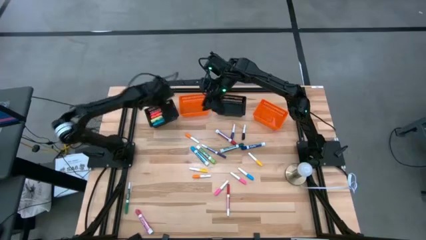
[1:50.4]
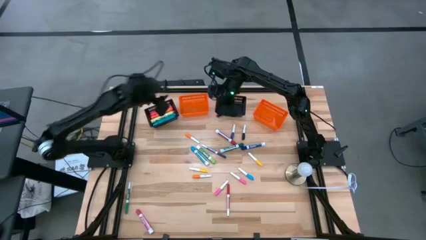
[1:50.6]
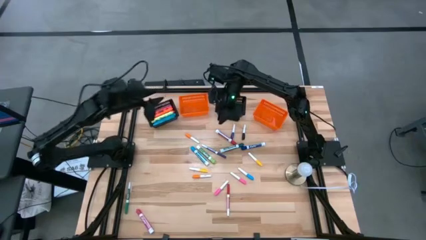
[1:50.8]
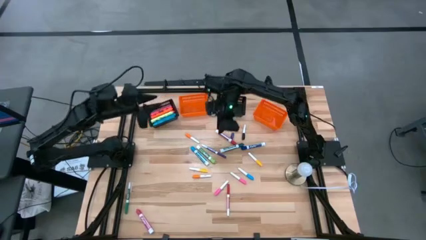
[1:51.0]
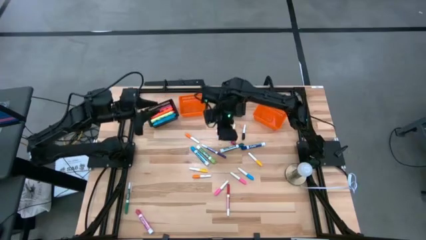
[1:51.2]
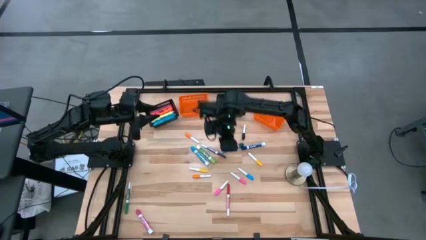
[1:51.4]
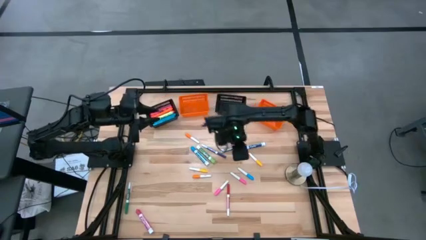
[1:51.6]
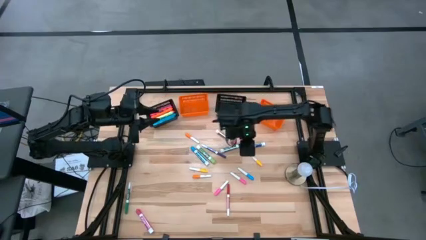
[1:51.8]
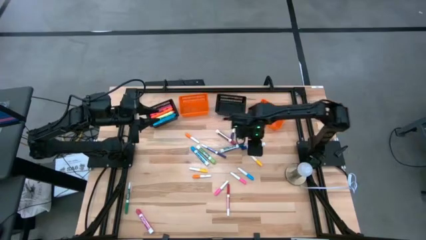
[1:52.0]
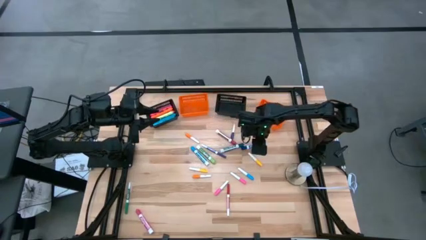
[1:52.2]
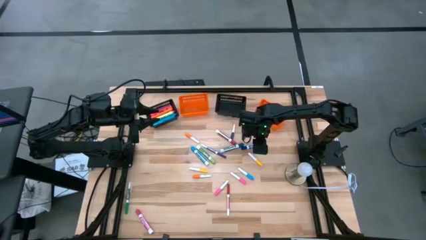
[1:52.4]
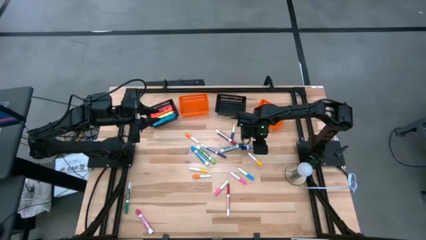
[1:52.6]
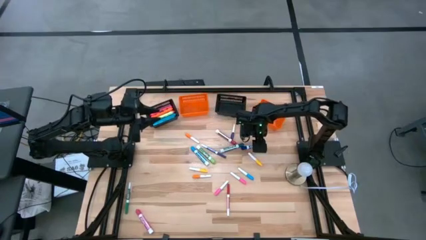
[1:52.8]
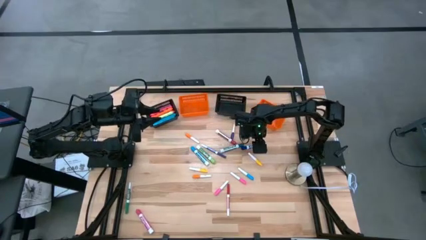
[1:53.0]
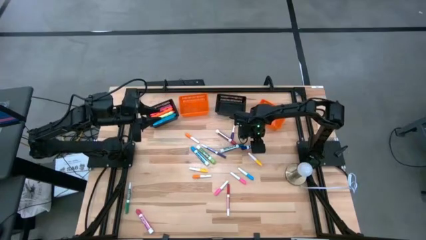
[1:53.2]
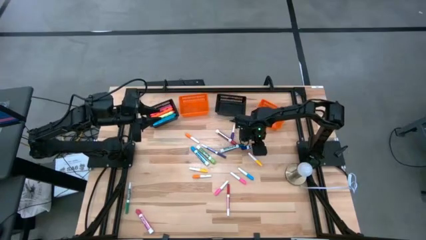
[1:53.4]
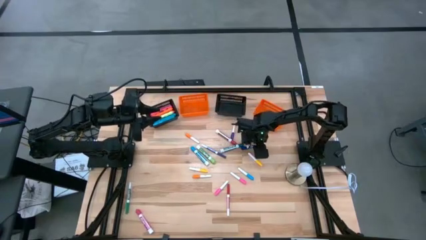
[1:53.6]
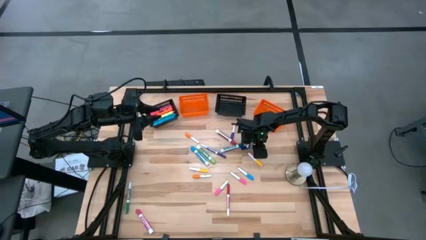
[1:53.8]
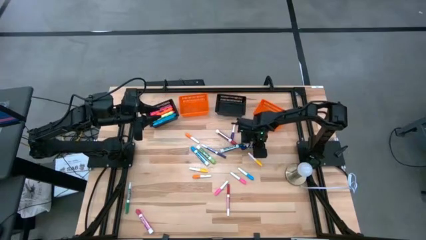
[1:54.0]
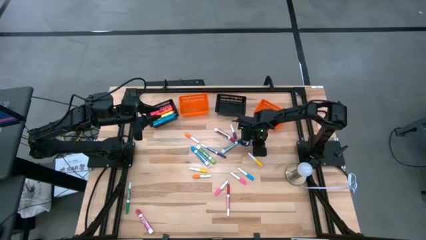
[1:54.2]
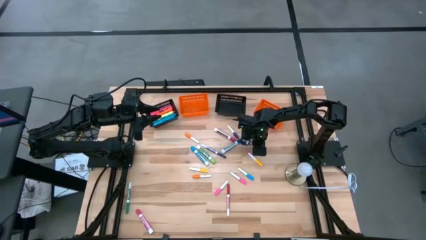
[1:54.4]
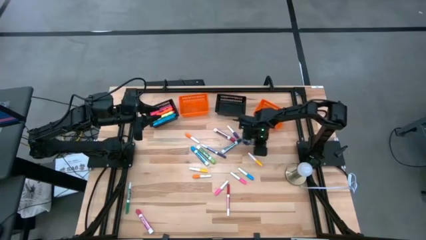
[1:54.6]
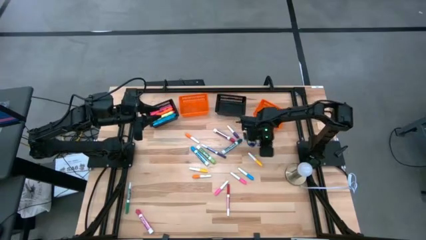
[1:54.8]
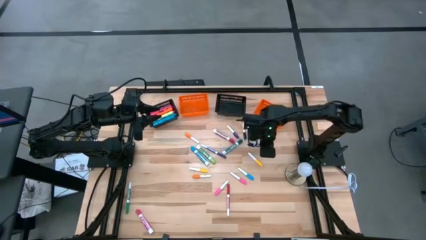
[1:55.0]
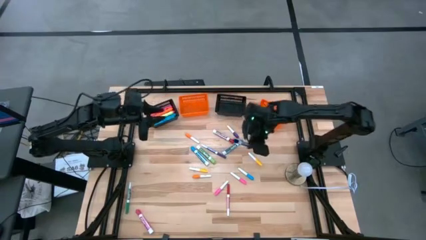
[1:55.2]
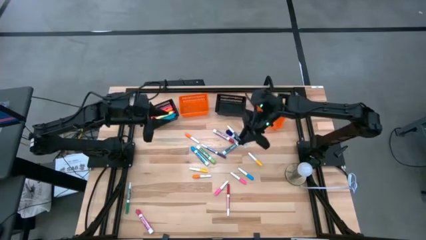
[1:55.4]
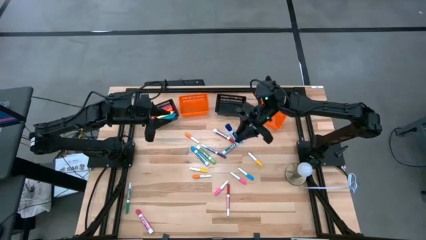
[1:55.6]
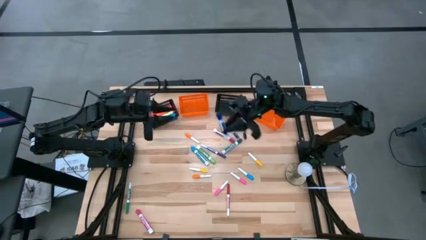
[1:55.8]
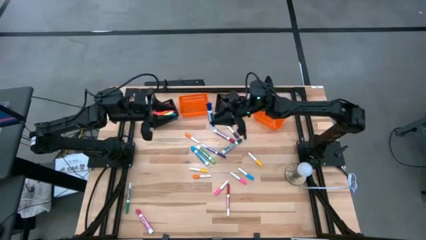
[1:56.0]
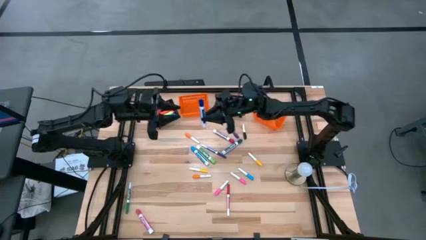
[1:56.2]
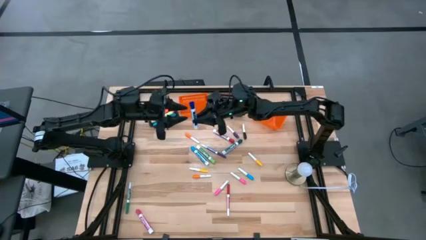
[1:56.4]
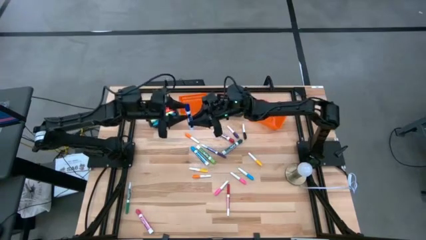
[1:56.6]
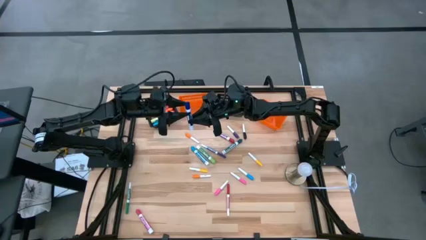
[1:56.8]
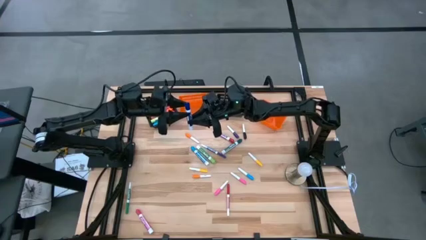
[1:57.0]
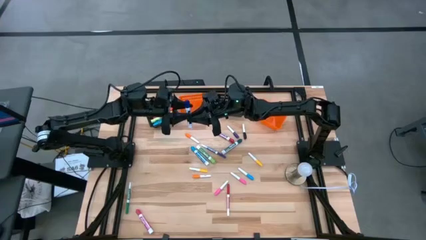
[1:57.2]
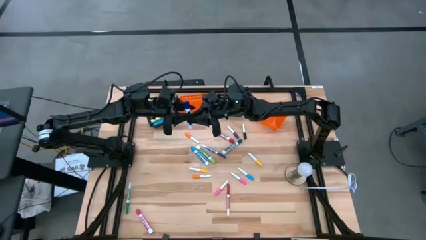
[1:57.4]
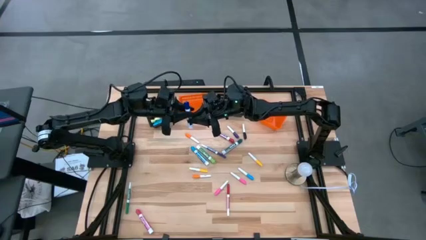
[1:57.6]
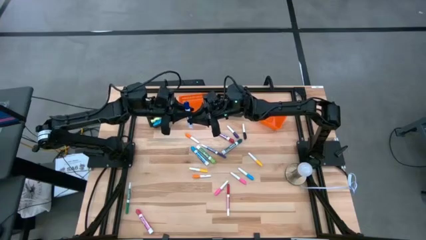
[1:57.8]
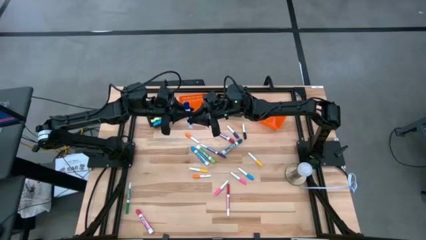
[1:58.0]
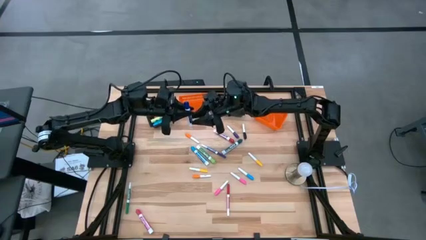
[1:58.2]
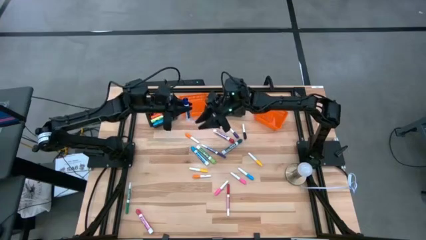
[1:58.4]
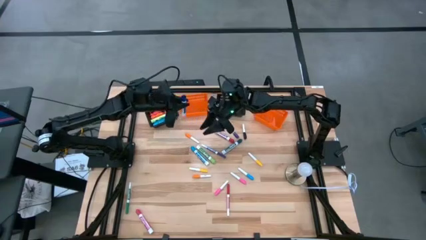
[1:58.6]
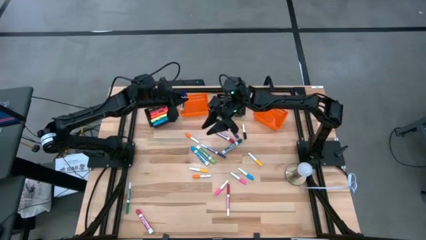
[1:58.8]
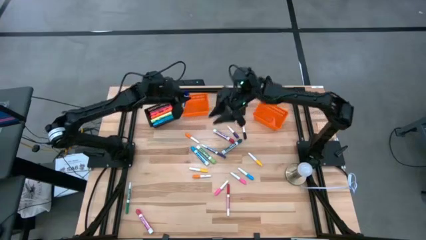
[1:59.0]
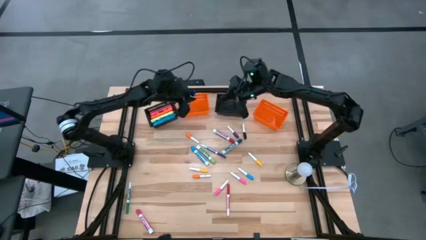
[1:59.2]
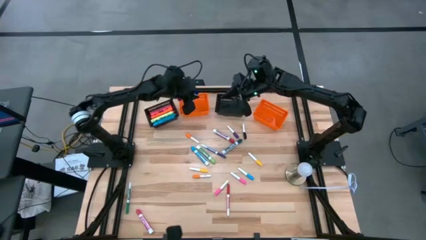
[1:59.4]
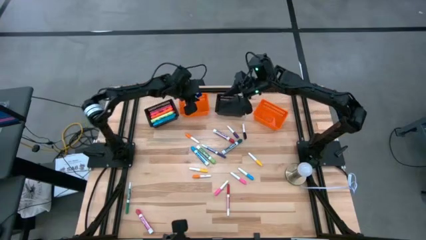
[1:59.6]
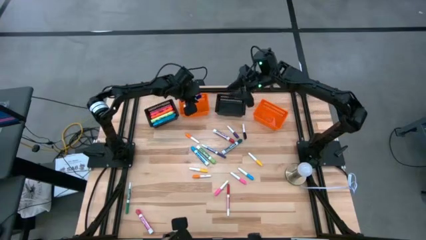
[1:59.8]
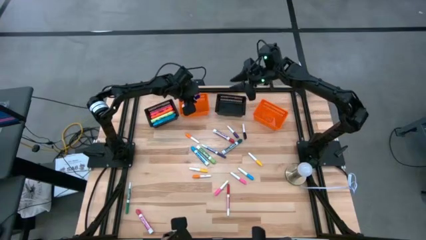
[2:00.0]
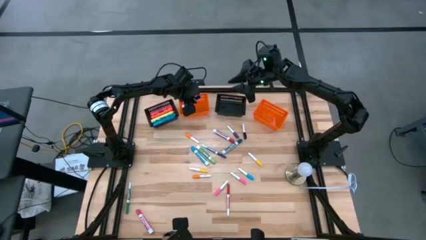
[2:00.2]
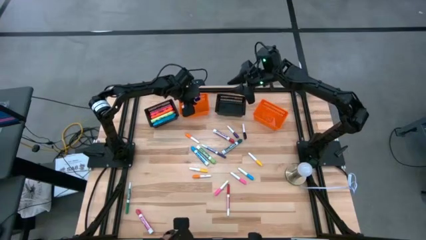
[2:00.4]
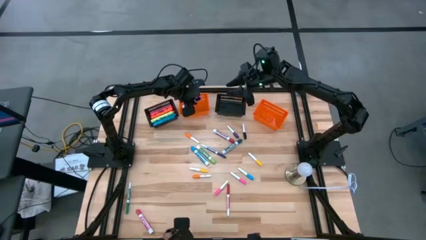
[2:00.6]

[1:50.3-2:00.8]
Task: Pick & Place Markers
Put the dark blue marker pen into the left orange bin

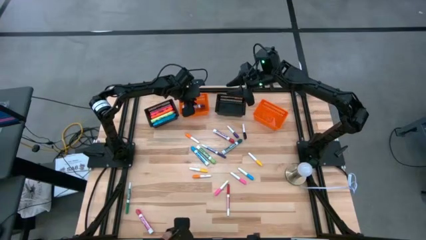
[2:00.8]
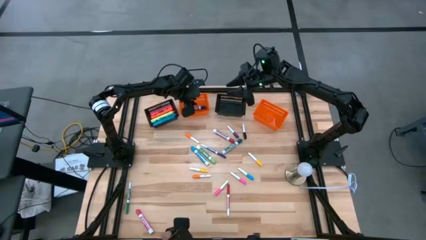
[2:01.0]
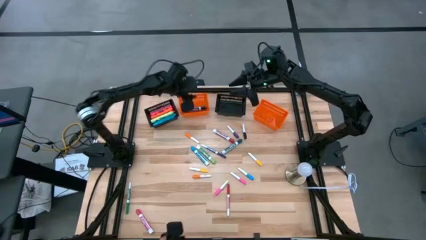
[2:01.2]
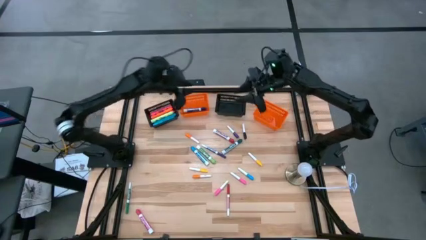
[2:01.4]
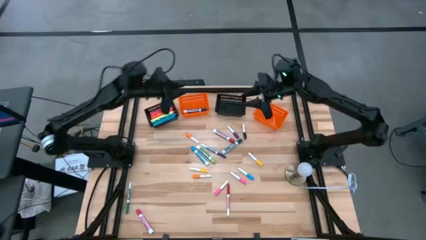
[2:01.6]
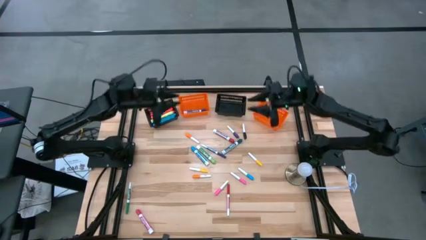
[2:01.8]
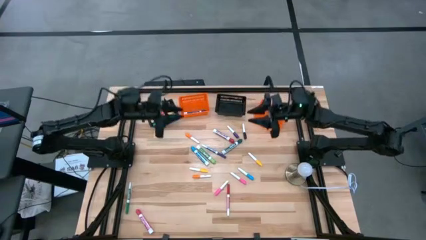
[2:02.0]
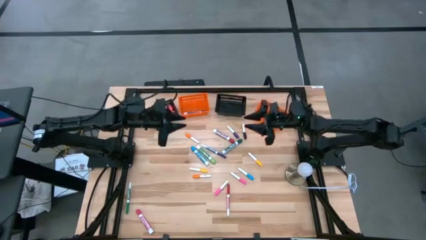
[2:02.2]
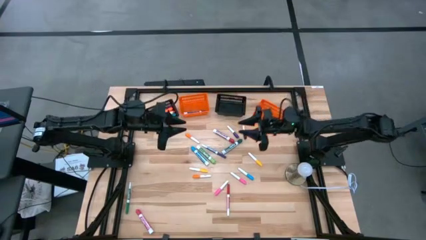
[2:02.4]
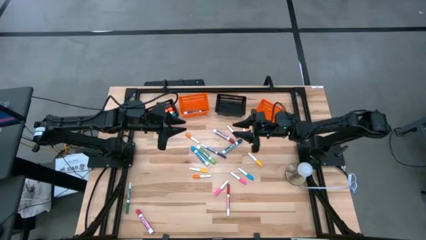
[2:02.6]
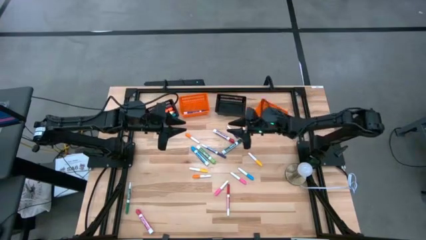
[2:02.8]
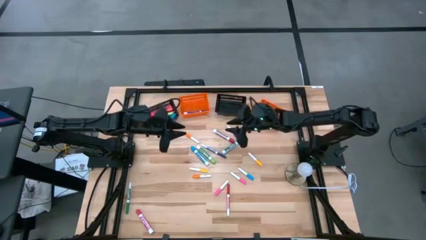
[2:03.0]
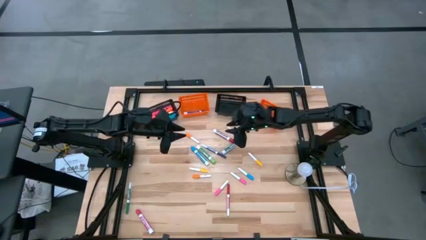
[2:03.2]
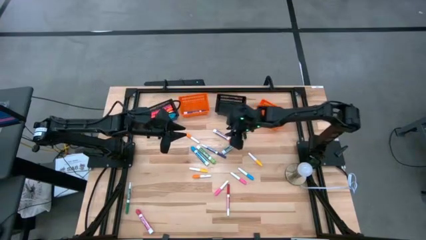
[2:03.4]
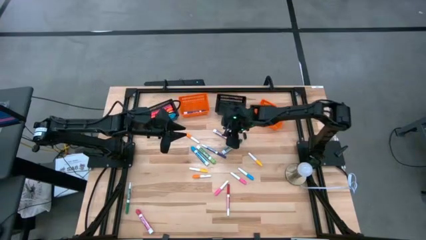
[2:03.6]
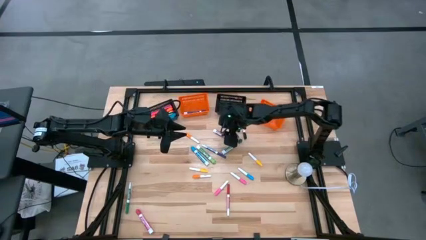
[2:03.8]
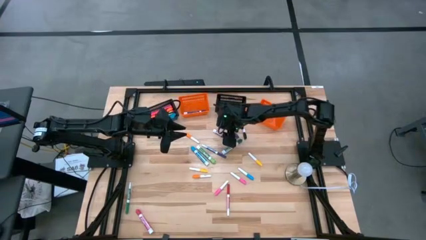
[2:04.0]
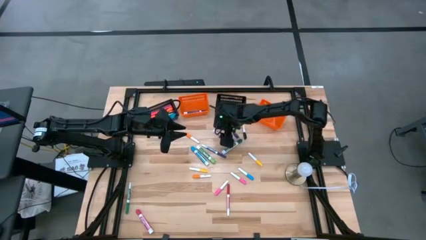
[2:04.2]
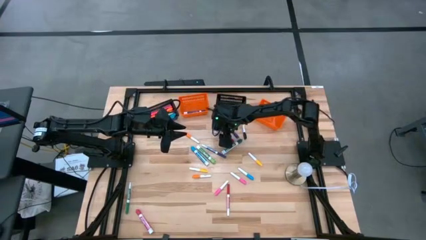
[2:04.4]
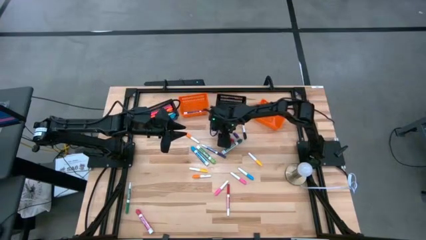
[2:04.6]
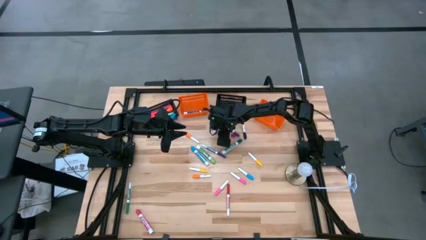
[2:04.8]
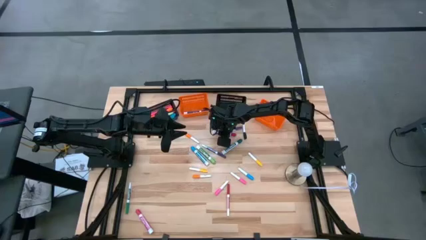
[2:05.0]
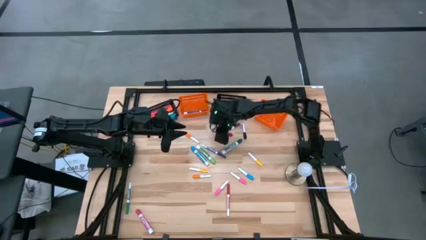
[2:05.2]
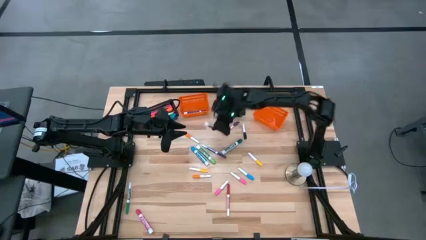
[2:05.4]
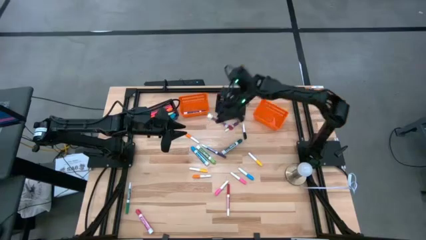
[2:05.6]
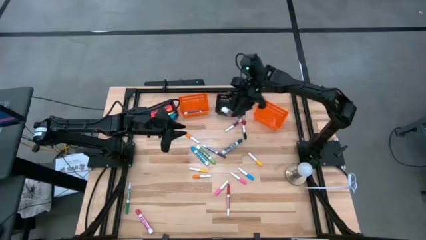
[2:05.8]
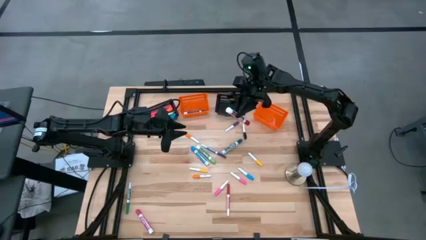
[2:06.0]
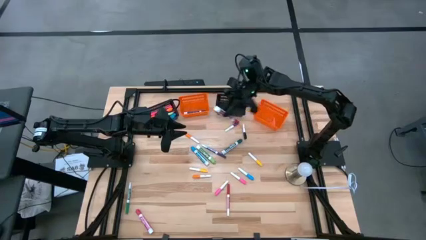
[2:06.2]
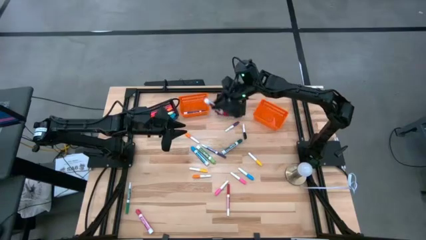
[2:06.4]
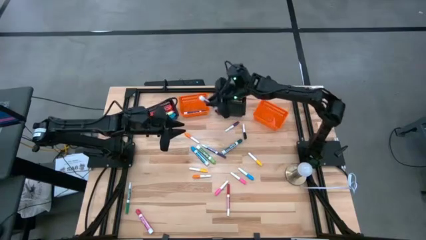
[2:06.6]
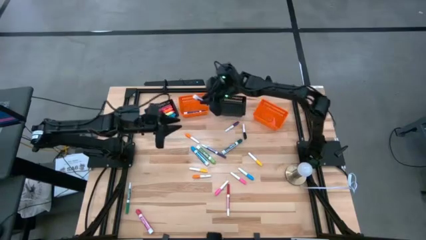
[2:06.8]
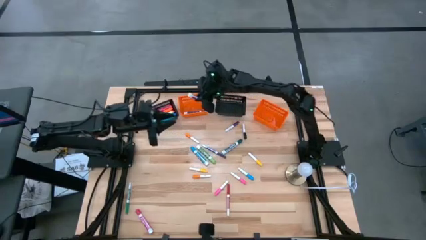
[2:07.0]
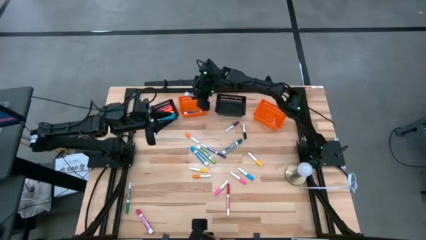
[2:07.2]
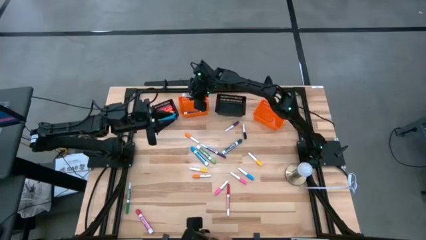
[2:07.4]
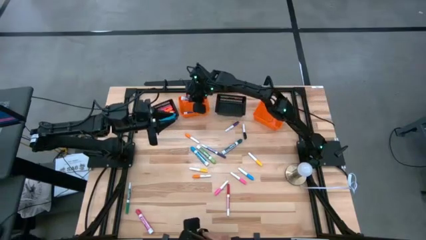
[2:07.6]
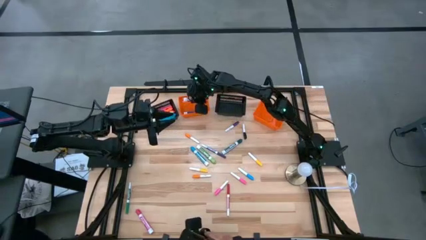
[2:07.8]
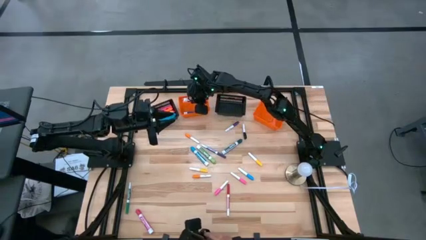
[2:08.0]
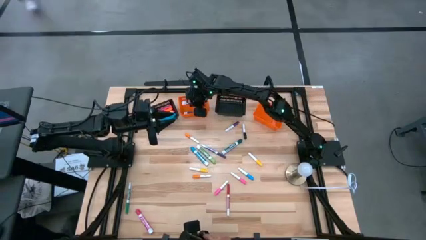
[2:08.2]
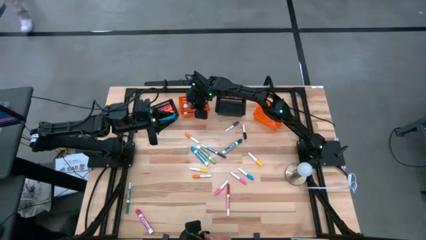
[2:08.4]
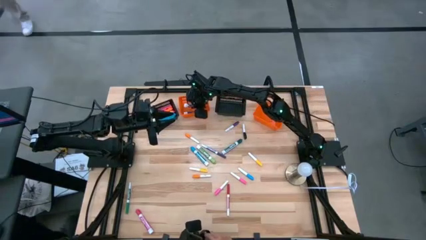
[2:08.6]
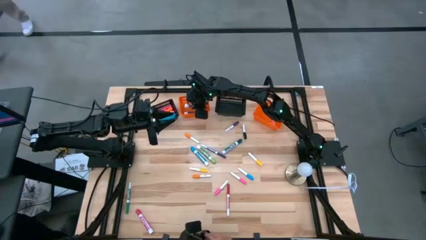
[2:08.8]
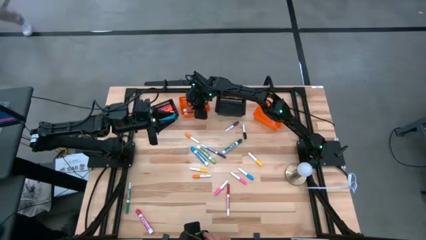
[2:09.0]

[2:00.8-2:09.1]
Put the red marker pen into the left orange bin
